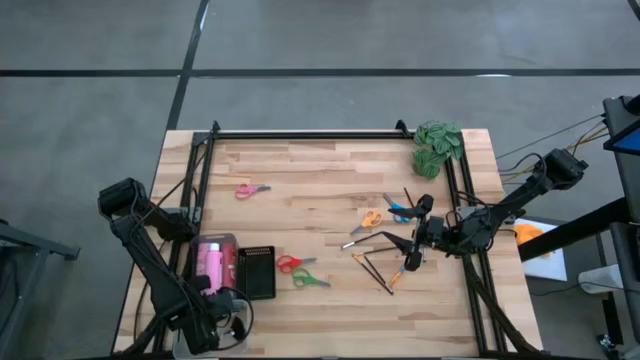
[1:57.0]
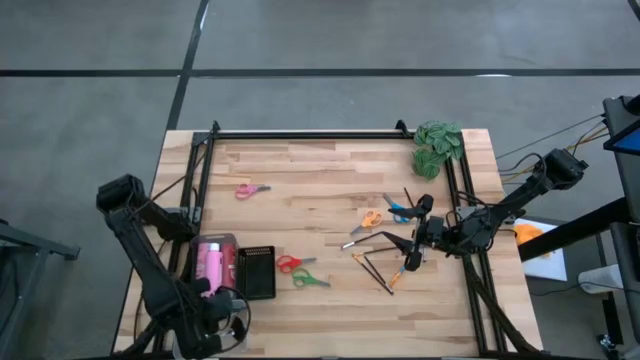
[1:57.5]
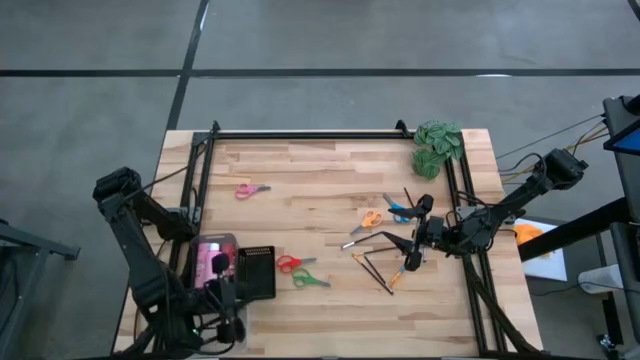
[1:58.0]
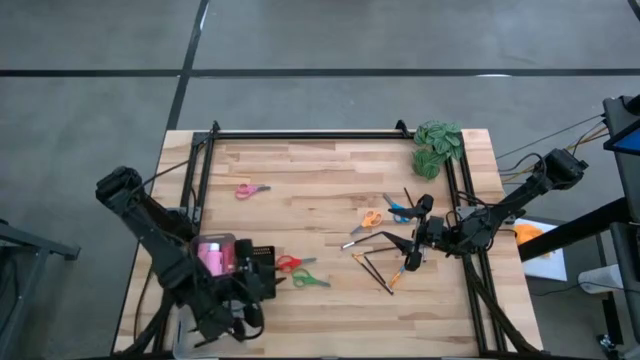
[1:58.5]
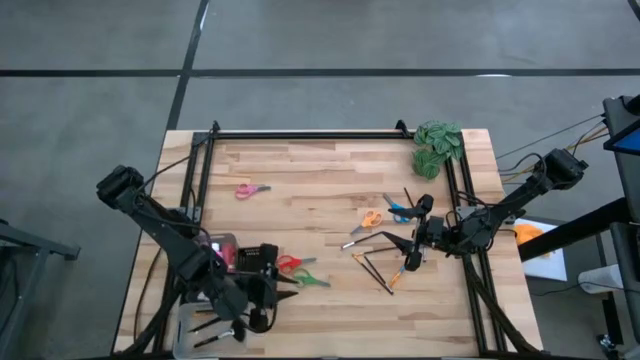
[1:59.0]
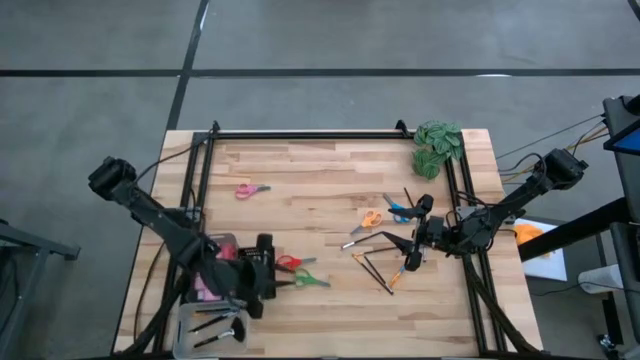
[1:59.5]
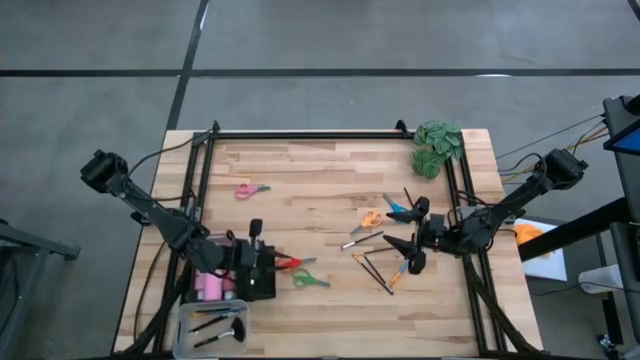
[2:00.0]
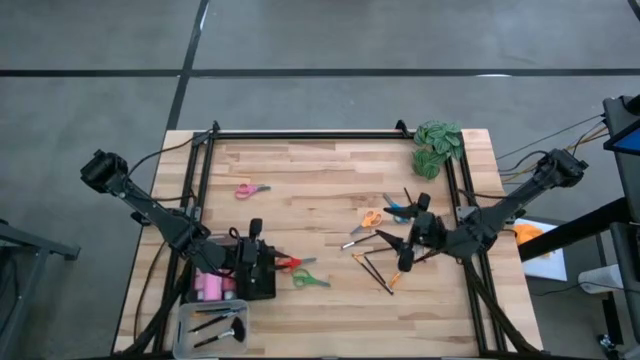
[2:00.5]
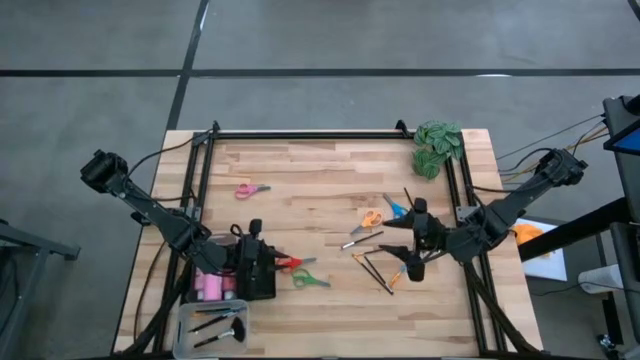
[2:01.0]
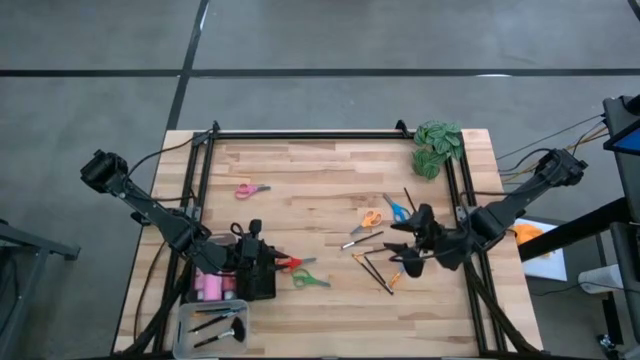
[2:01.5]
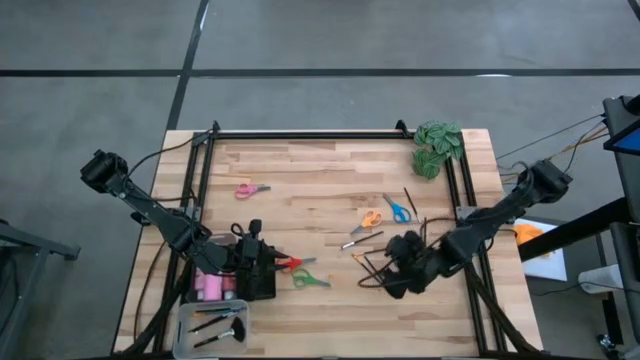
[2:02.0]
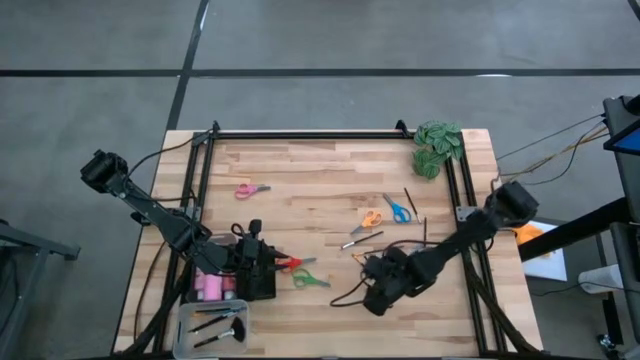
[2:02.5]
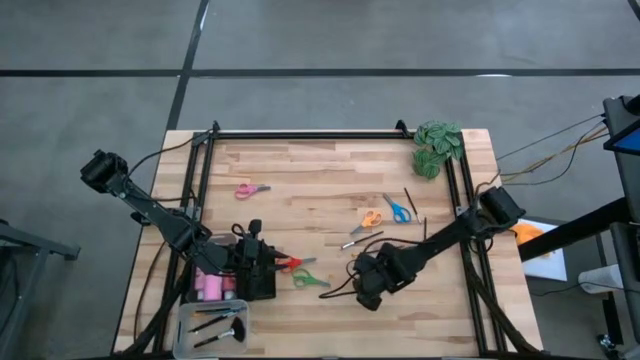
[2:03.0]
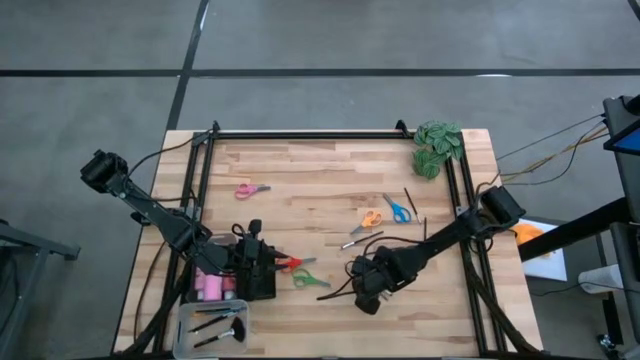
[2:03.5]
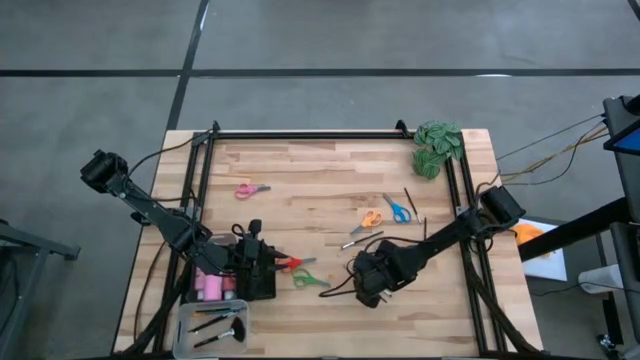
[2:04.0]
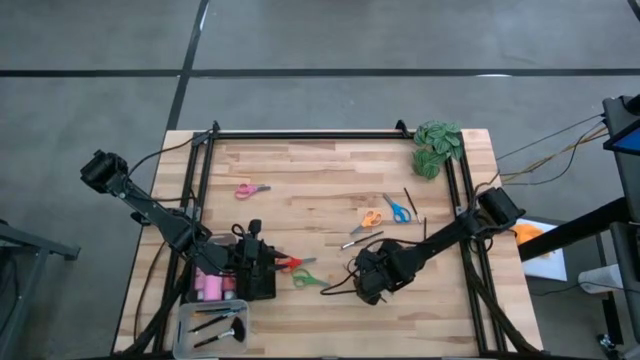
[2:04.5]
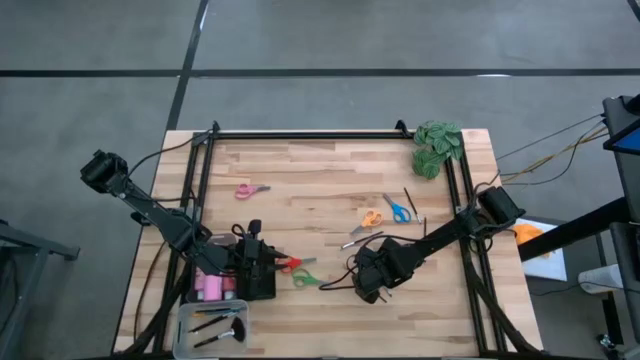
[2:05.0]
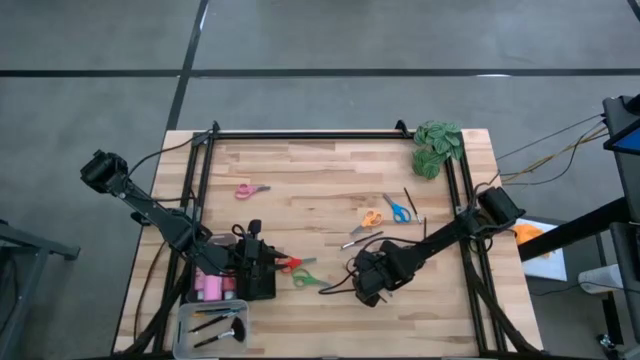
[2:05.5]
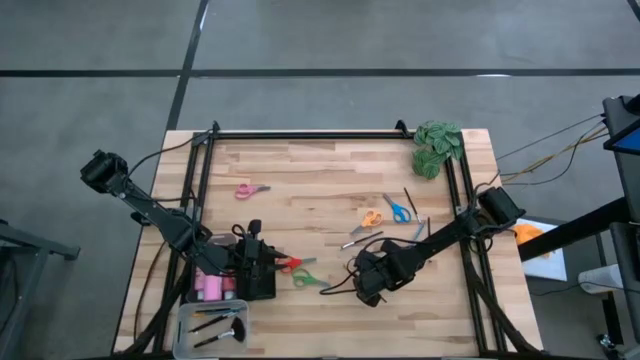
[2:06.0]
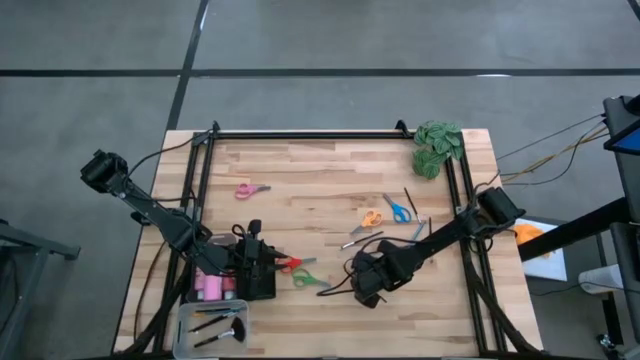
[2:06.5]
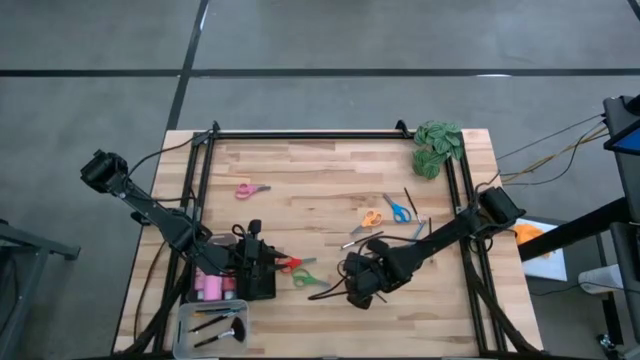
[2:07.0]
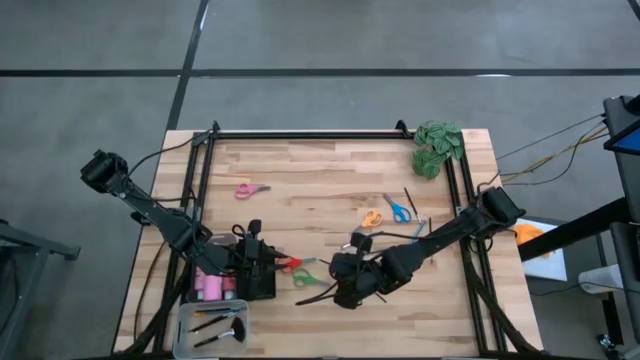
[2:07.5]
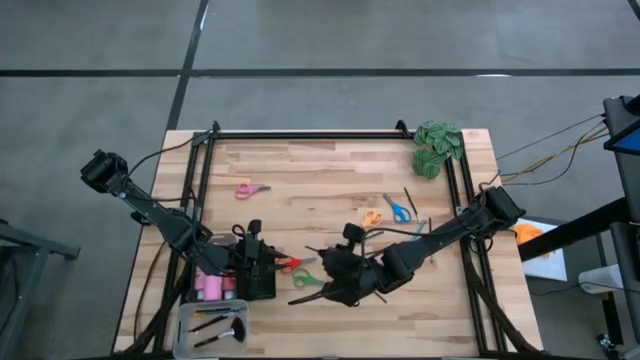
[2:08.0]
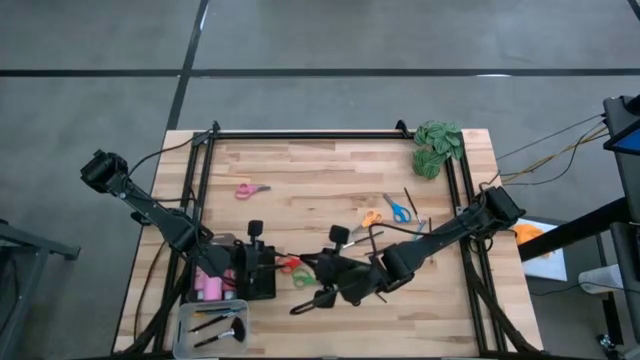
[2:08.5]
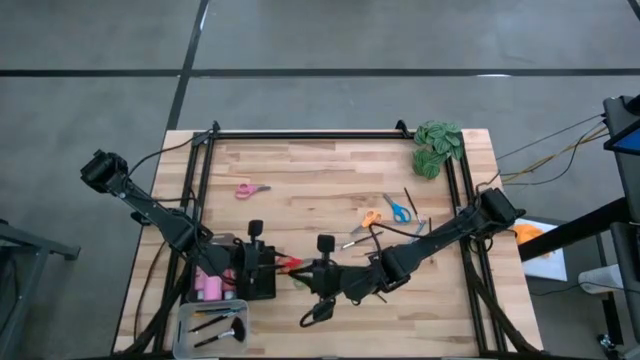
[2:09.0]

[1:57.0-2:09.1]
Task: Pick & Place Paint Supplies
Put the silver paint brush into the transparent bin

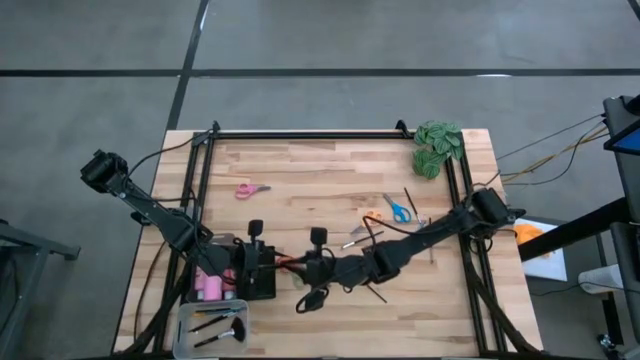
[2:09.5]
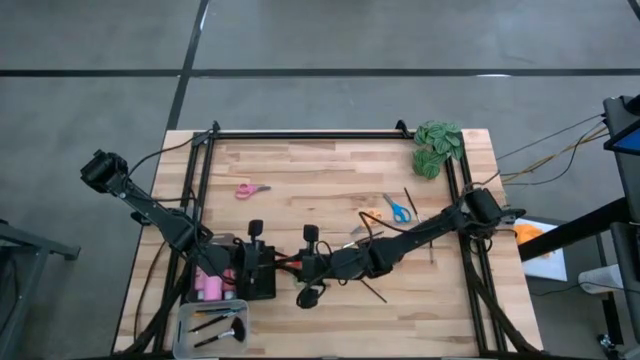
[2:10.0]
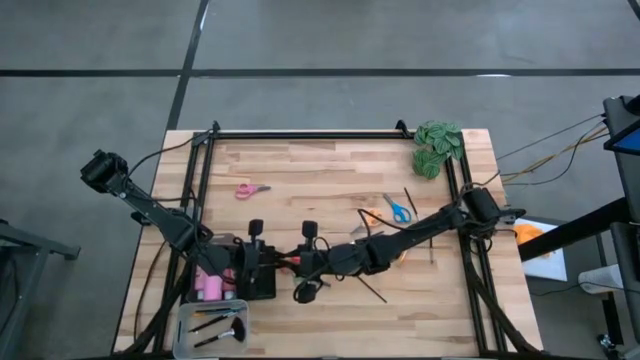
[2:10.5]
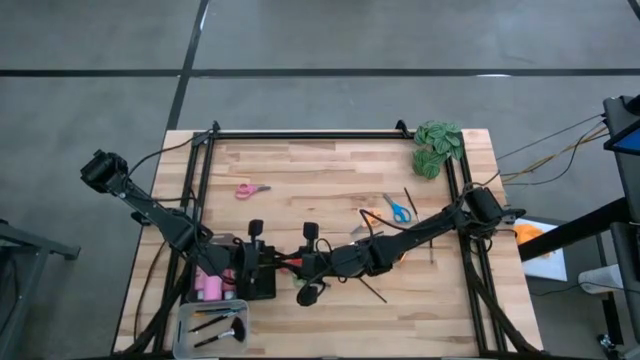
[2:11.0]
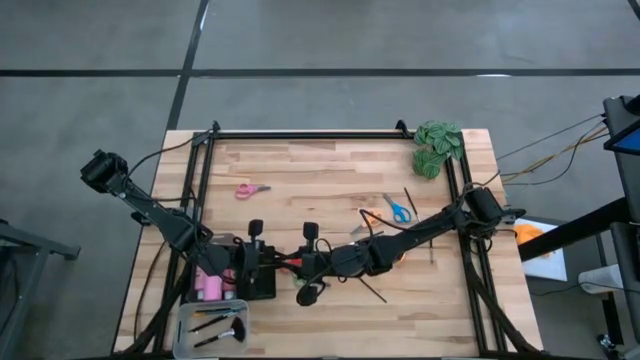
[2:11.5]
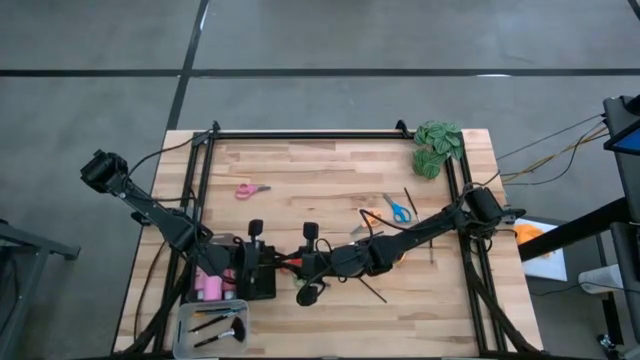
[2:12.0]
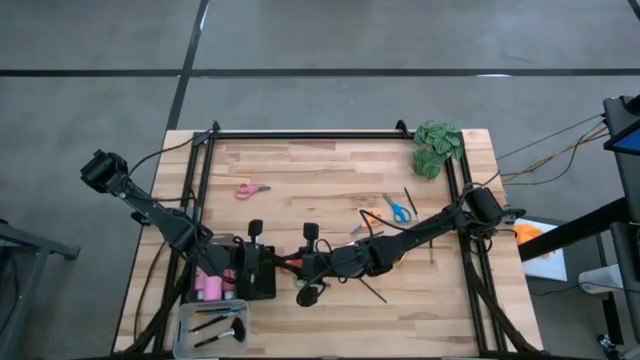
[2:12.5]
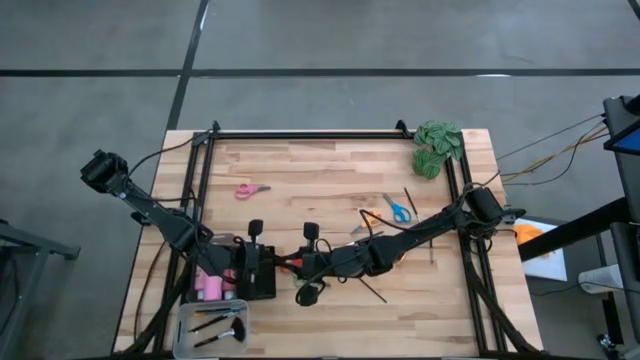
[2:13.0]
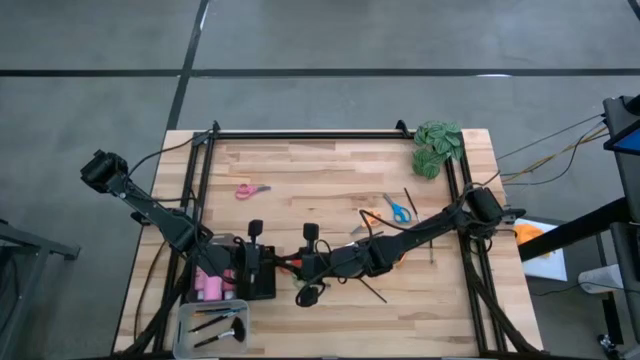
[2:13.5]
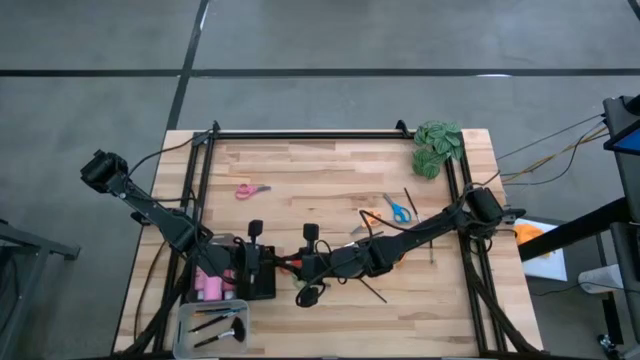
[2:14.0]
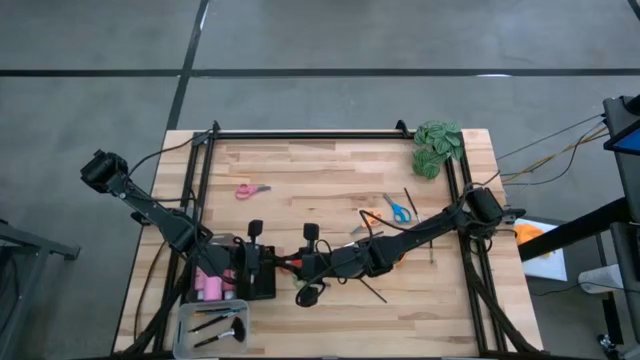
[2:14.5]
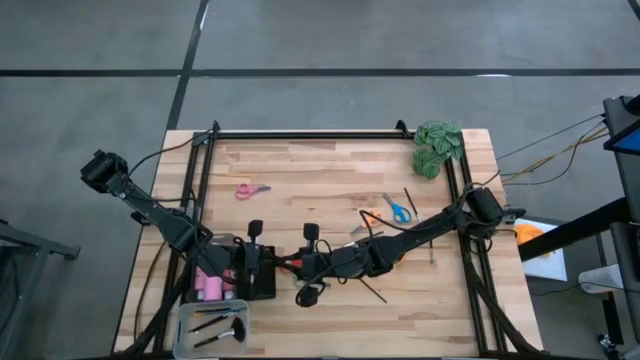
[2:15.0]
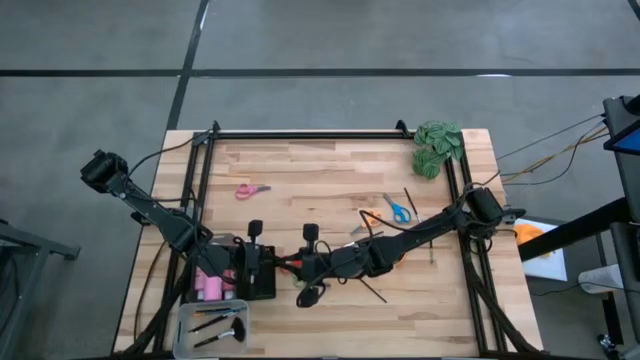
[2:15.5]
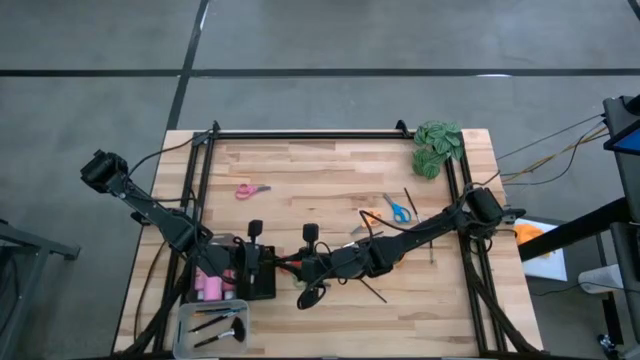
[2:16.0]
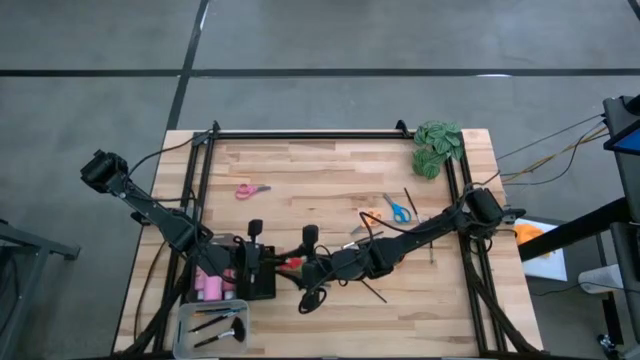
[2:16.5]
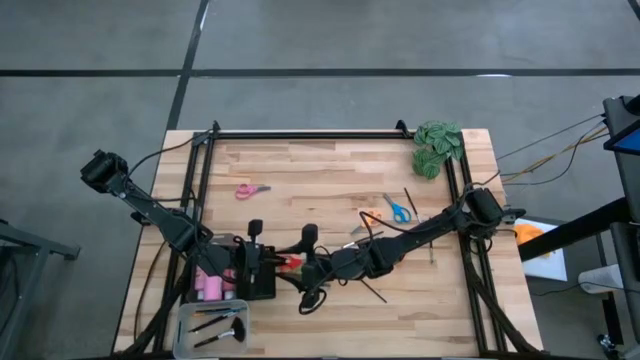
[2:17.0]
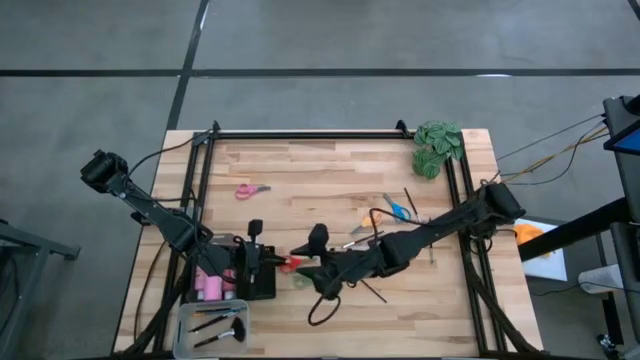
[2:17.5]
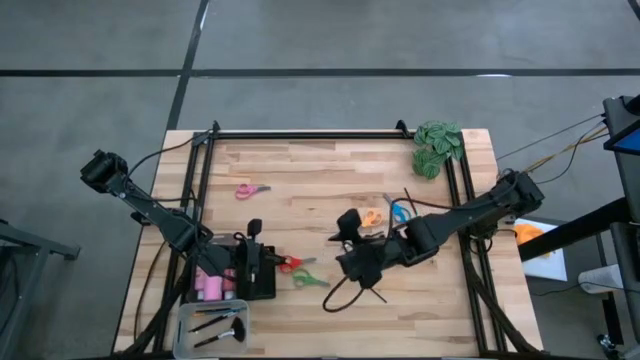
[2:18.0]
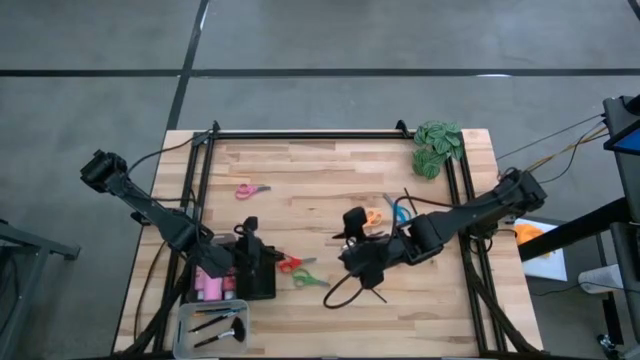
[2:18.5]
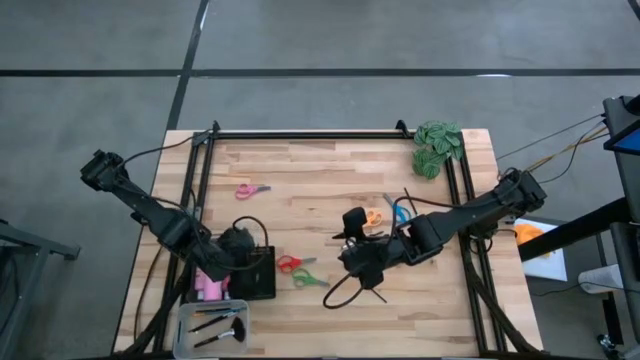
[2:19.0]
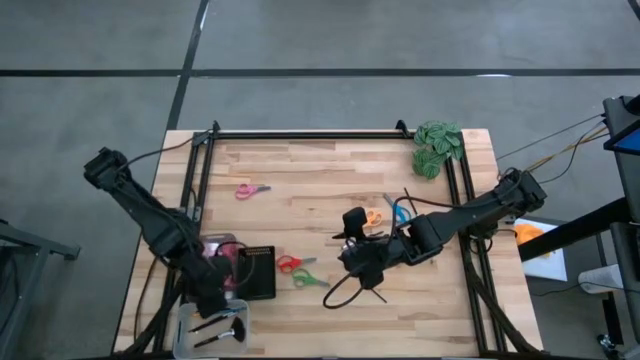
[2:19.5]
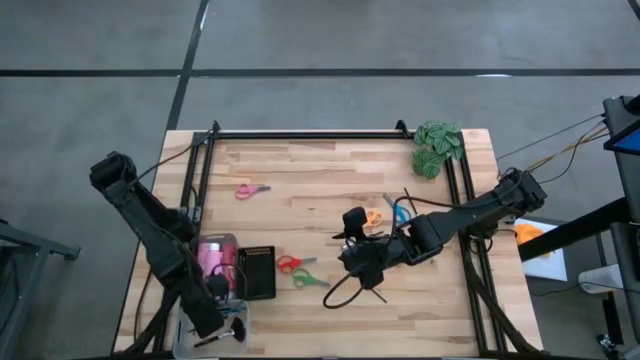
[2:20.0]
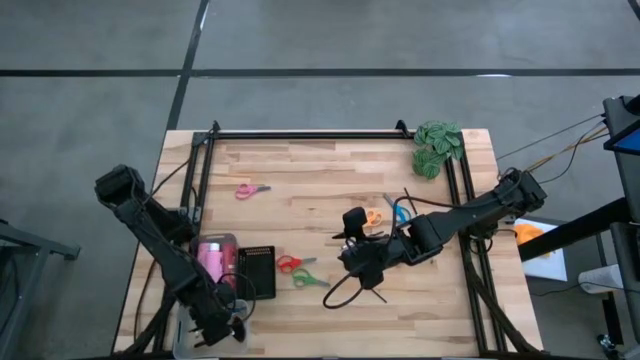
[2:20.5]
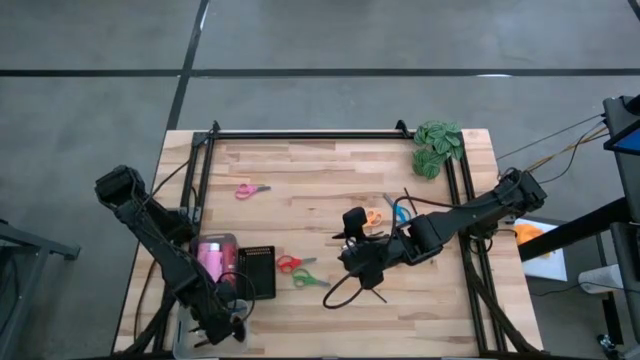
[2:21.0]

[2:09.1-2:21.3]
Put the silver paint brush into the transparent bin
